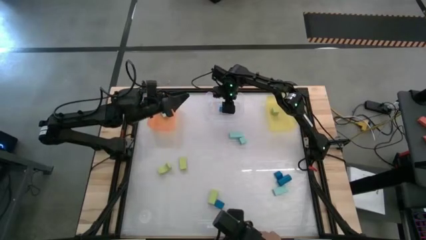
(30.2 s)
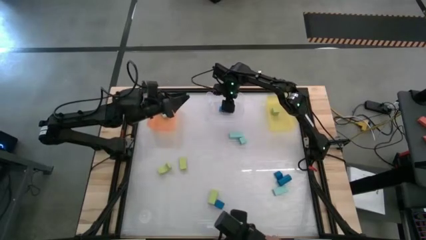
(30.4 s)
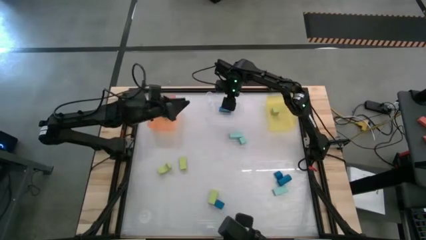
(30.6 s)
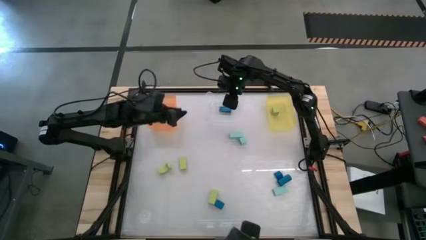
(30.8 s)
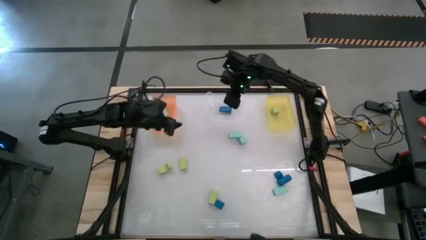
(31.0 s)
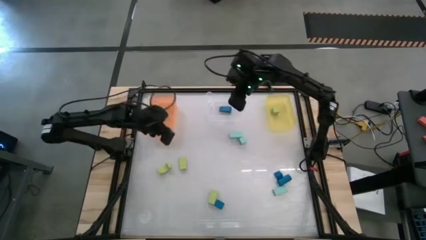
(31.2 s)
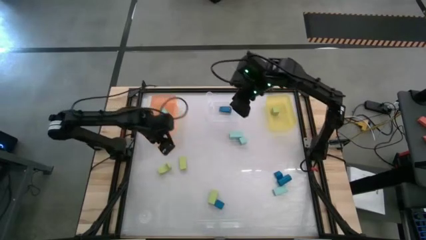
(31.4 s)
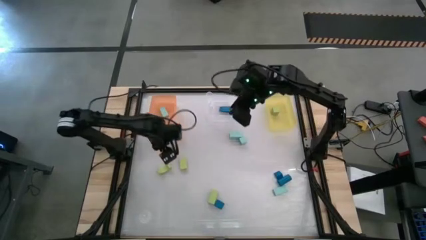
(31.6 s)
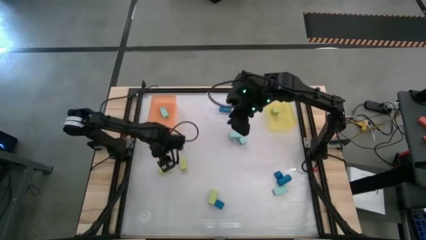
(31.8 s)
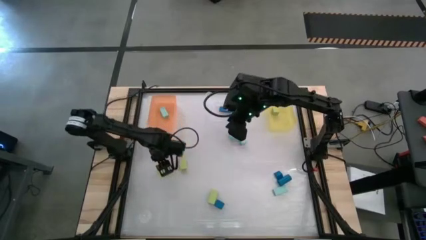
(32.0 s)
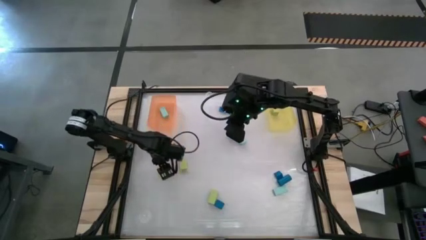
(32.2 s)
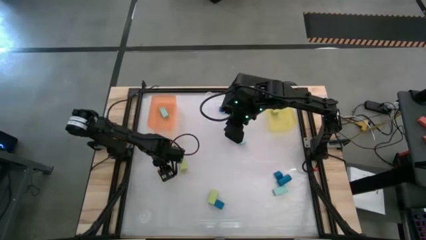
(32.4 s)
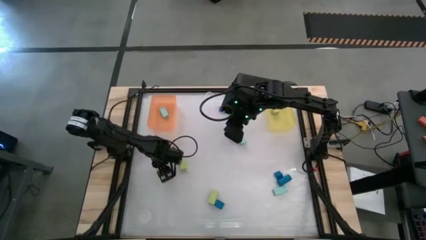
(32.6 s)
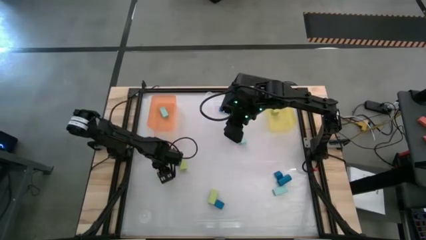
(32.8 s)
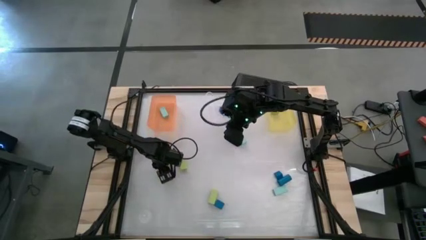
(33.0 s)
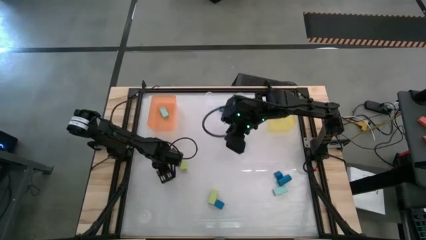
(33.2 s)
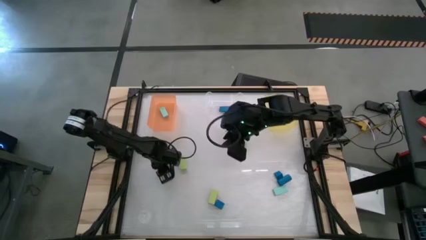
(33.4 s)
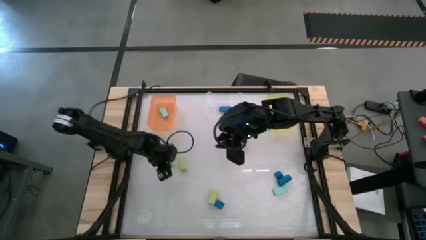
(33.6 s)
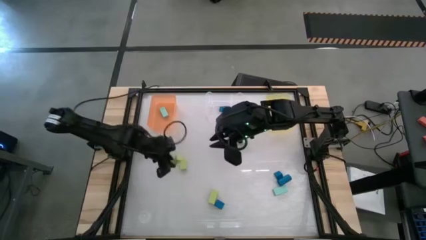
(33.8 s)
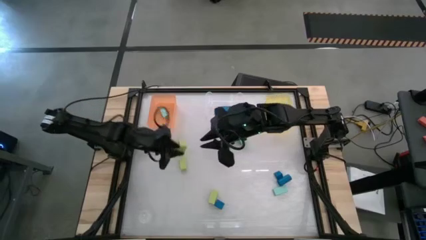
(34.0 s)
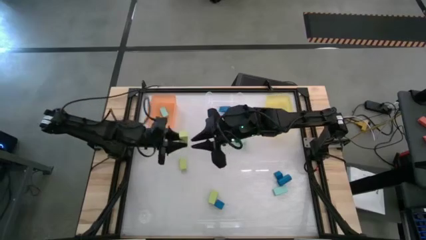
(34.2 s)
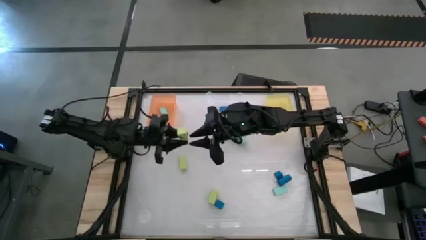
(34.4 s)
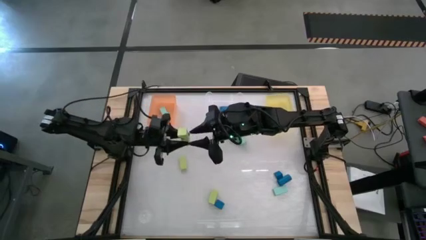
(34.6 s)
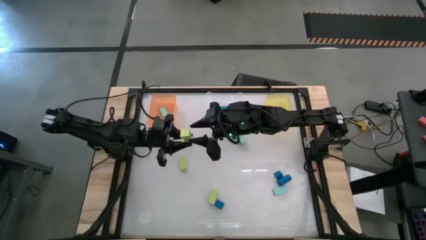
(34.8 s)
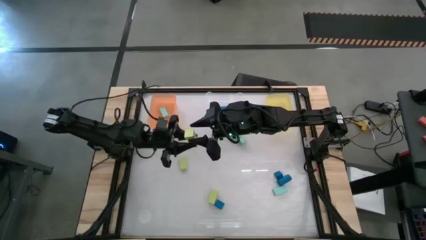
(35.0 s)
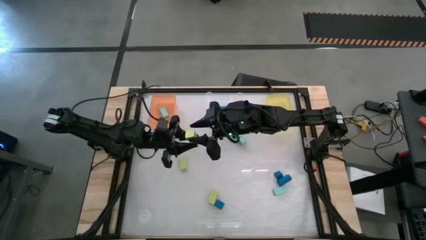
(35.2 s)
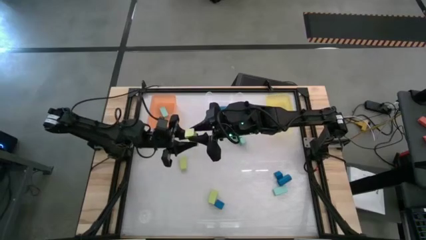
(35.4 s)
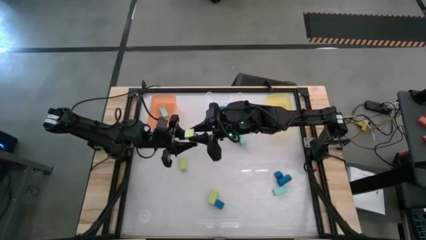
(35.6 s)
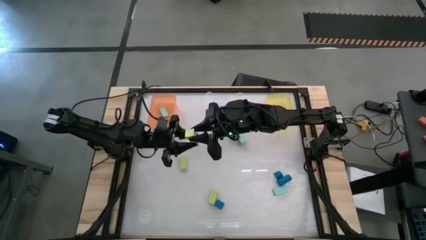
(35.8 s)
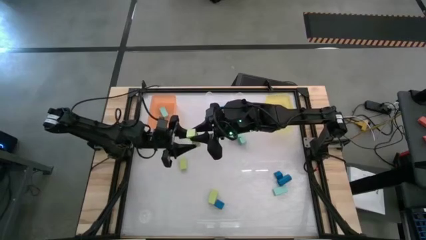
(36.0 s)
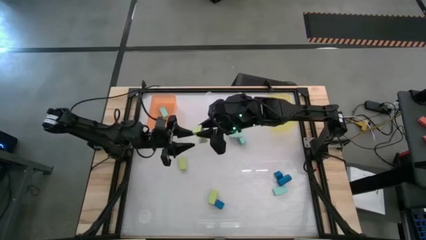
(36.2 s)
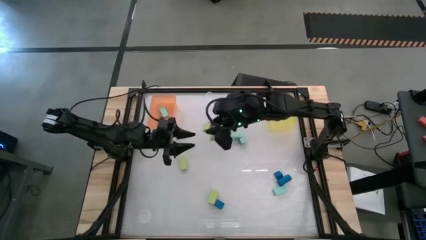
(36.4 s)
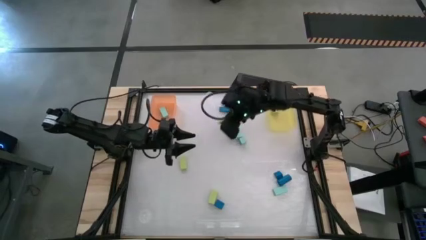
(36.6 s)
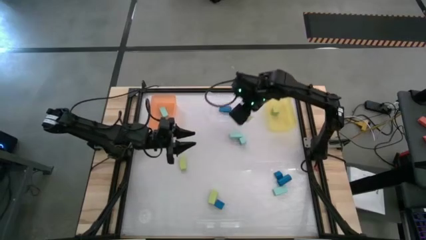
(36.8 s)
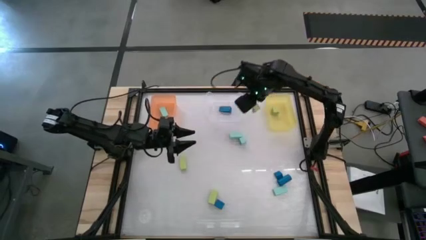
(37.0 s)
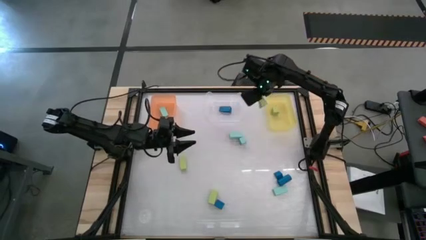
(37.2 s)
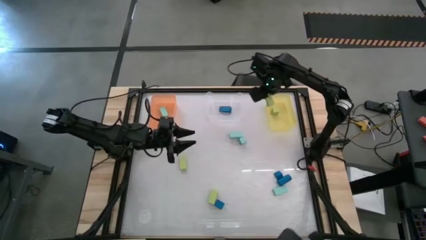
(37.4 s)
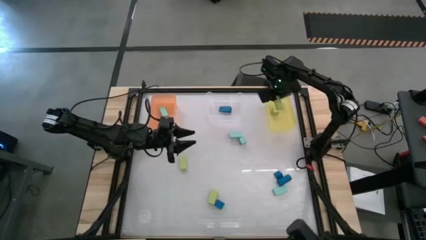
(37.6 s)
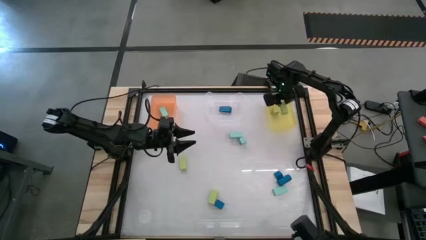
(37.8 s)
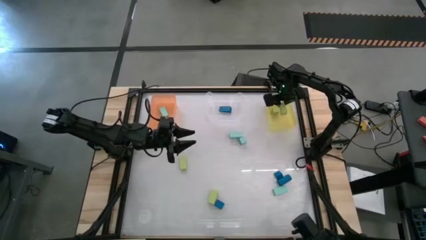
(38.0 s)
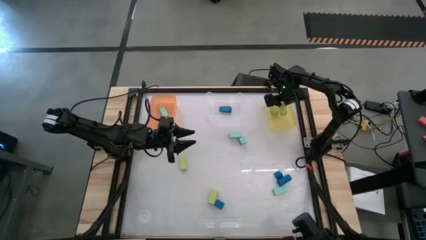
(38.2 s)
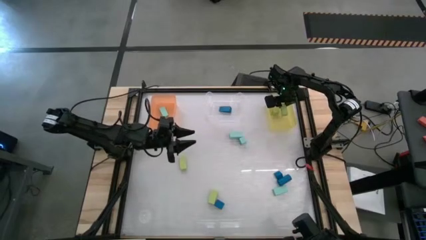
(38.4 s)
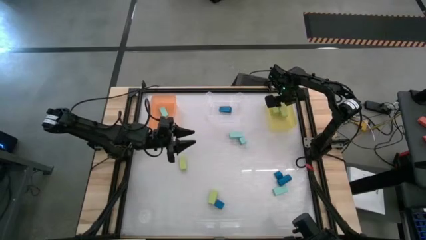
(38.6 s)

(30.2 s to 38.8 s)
Task: Sort & place blocks by color
Put the green arch block into the yellow bin

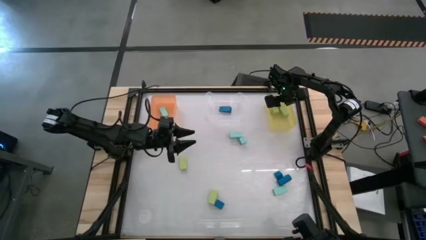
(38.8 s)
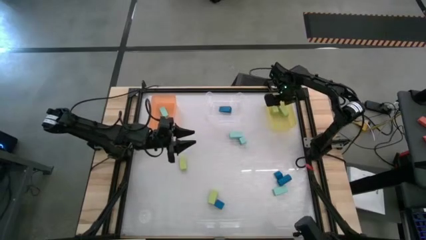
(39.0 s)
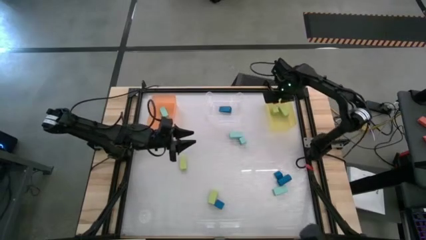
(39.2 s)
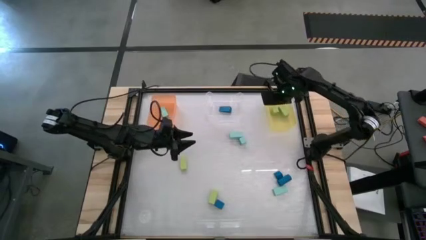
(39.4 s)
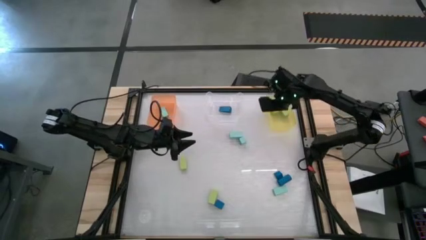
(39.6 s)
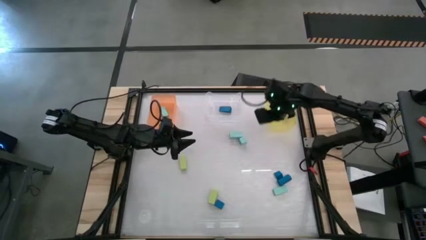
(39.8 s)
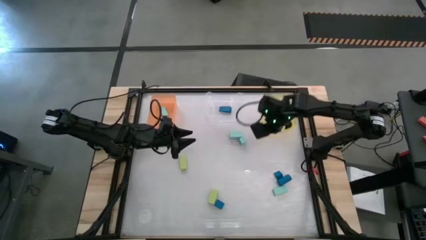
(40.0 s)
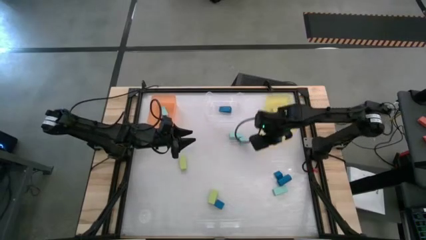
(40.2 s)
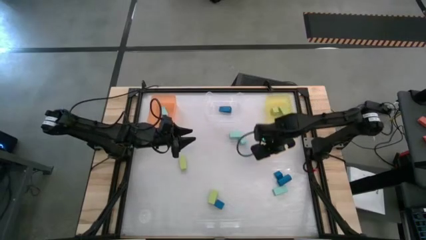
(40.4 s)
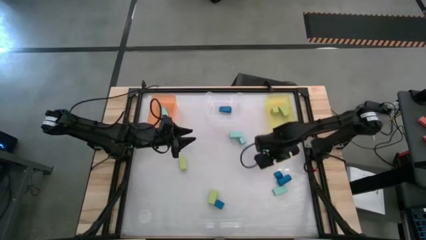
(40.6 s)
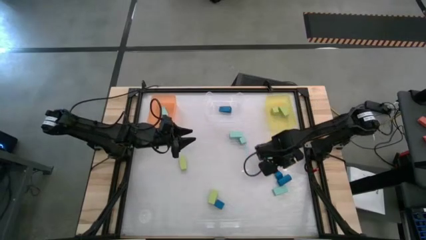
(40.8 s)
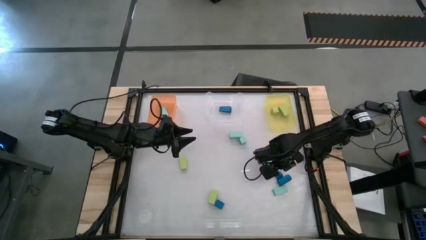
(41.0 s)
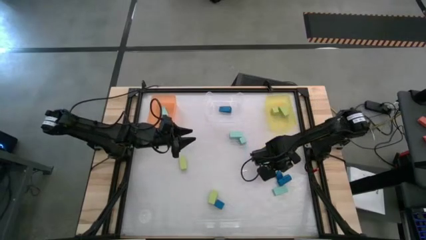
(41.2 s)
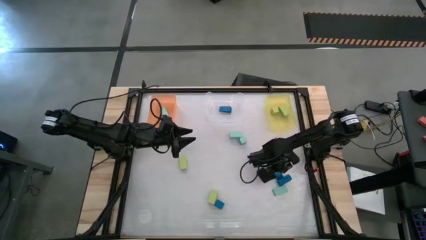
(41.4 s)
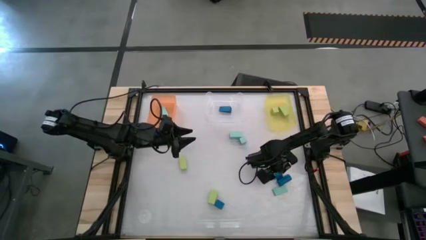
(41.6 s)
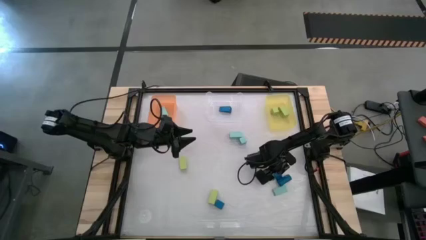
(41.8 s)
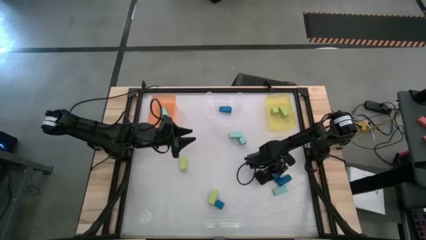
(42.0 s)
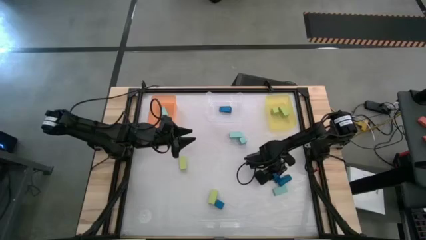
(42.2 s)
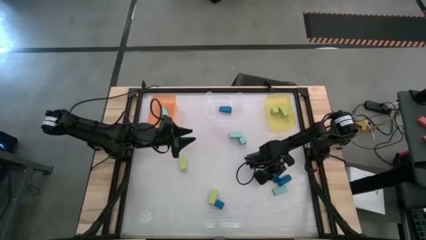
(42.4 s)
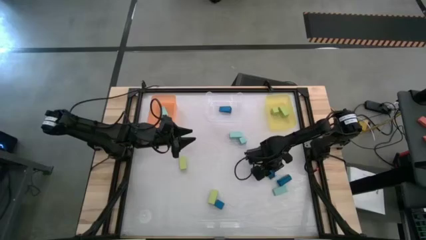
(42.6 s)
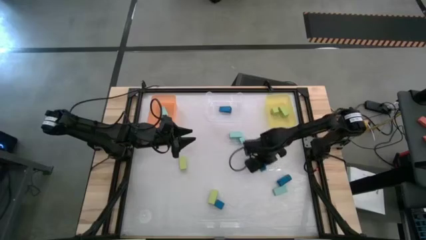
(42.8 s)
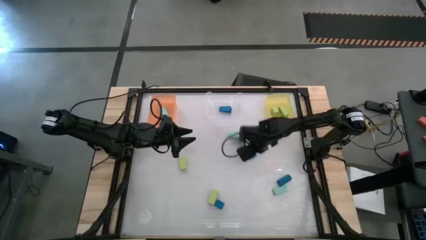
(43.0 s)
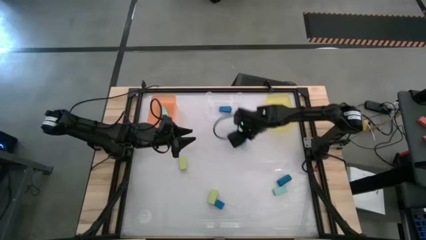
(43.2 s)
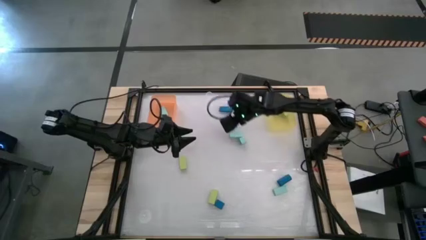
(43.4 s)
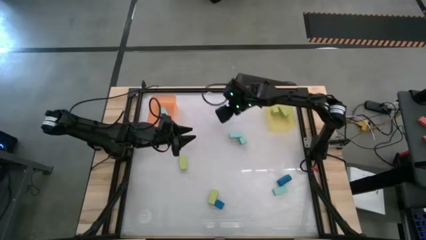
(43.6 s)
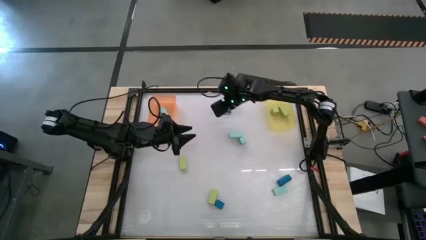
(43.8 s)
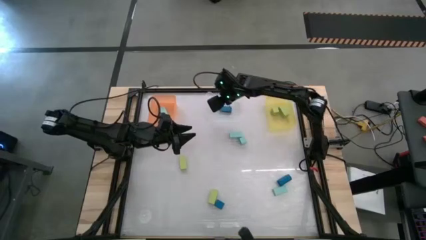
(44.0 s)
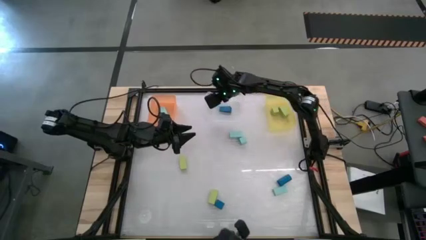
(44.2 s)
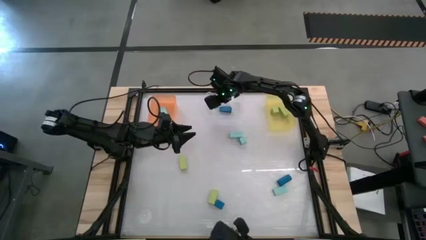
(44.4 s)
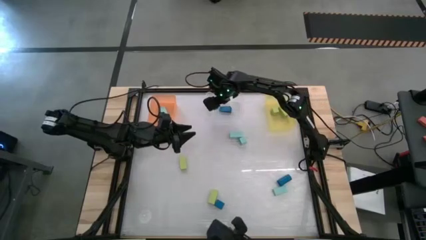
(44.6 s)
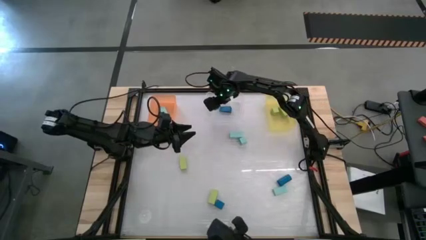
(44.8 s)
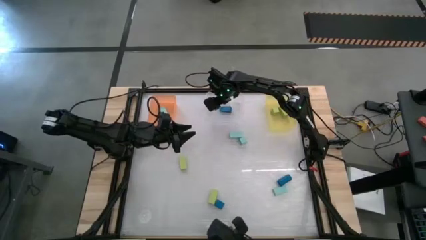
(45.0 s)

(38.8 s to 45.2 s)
Put the blue square block into the transparent bin

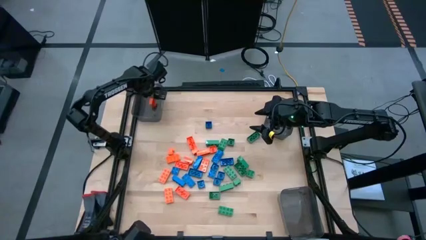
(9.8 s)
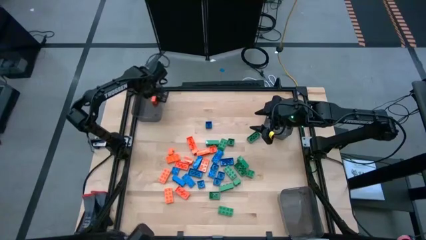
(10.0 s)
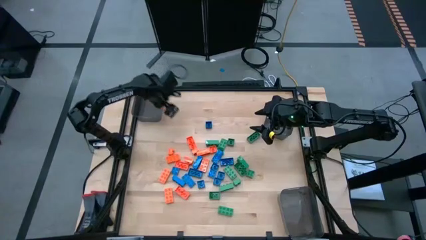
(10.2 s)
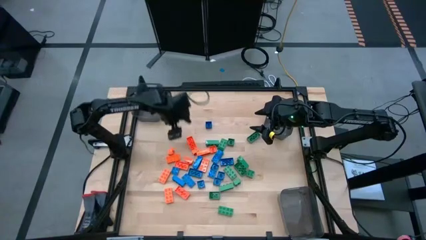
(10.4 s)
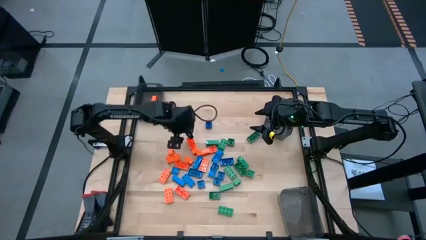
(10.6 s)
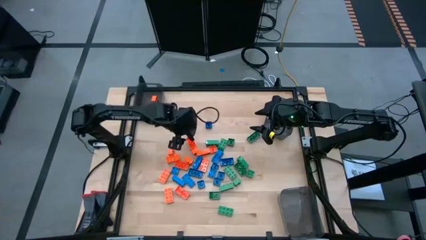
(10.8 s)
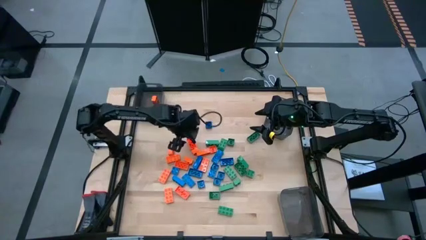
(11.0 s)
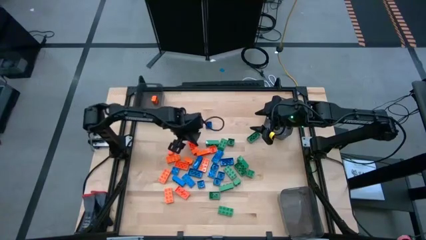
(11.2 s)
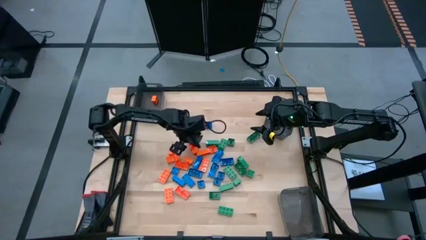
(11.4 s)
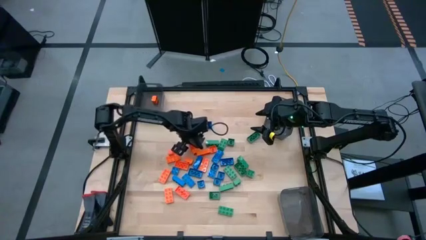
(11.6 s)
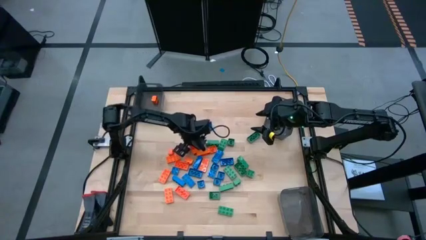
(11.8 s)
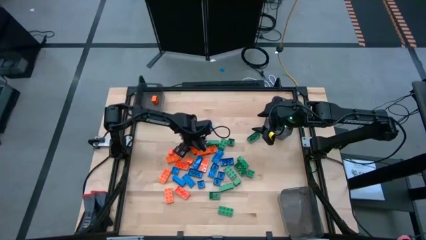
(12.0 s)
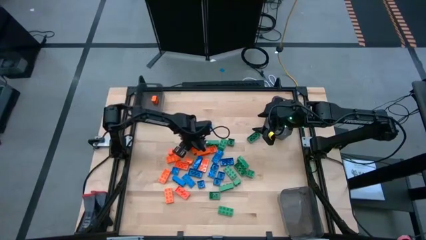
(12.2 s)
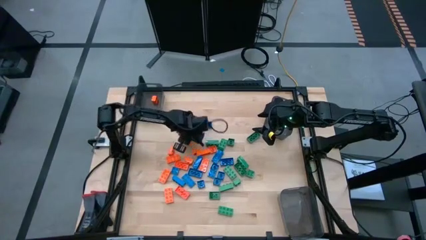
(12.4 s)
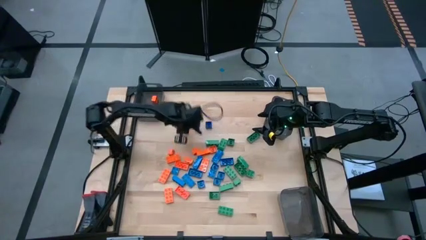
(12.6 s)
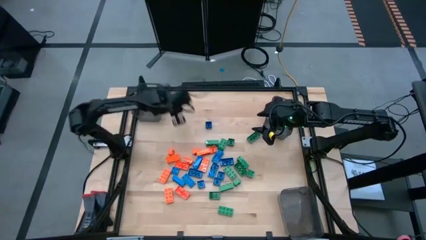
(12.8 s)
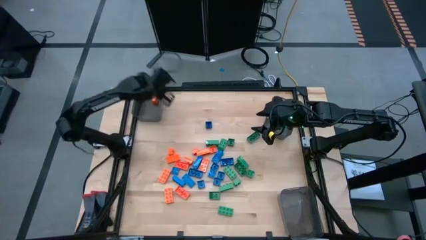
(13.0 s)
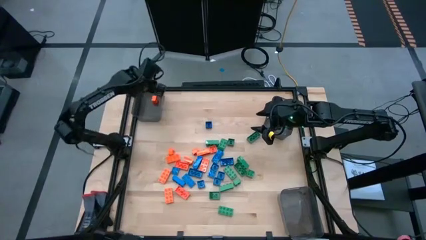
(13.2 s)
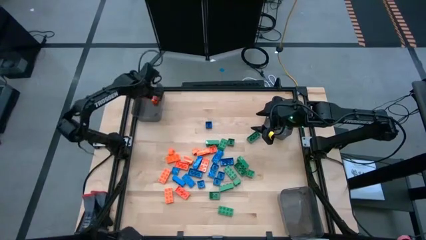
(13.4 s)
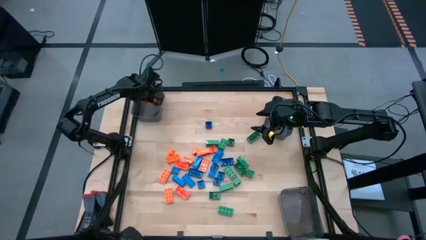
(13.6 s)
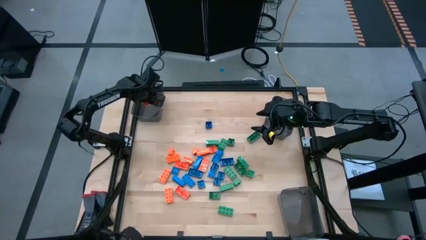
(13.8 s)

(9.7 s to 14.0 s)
Task: Sort blocks
Put the orange game piece into the top left black bin
